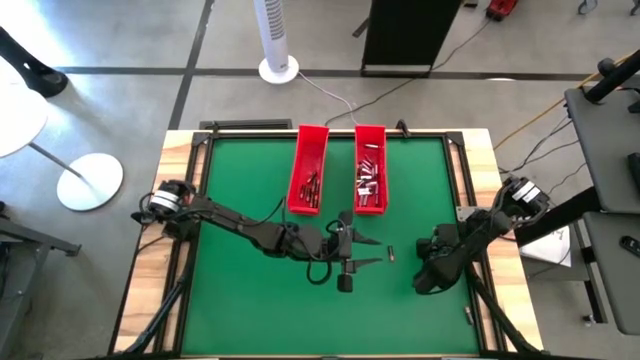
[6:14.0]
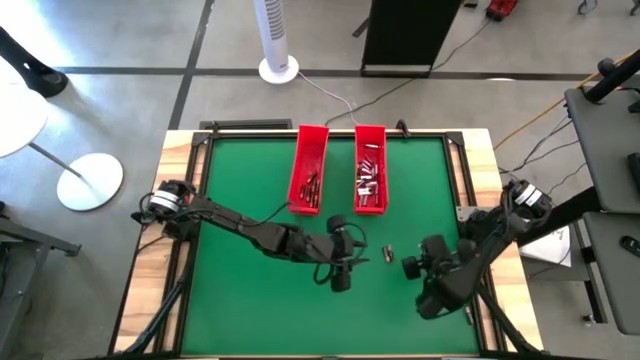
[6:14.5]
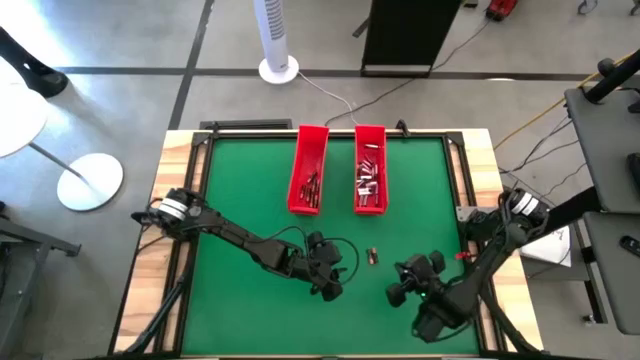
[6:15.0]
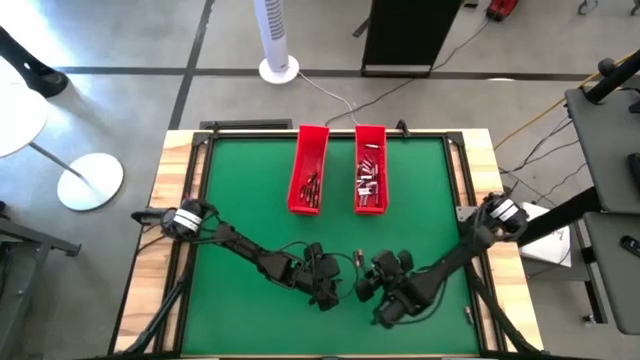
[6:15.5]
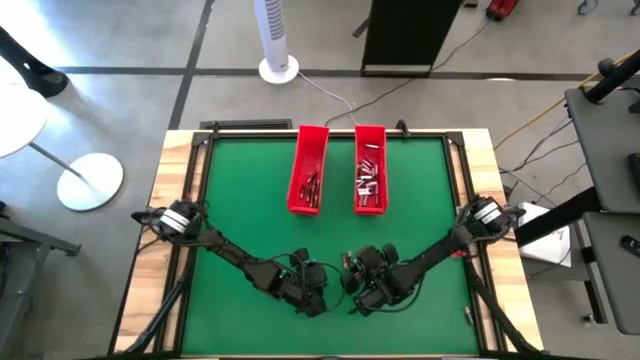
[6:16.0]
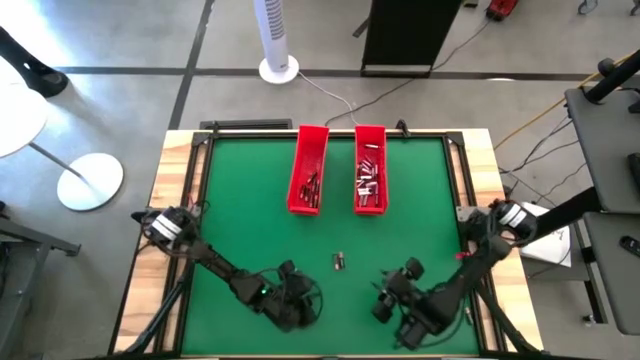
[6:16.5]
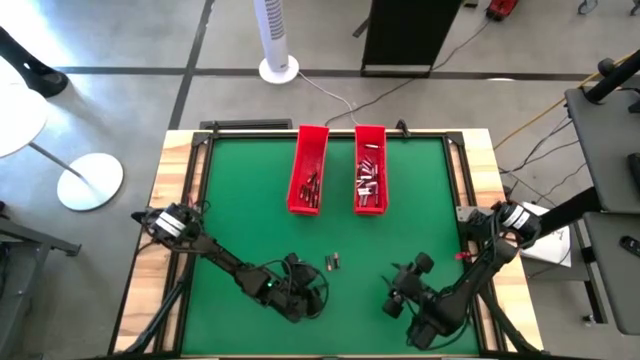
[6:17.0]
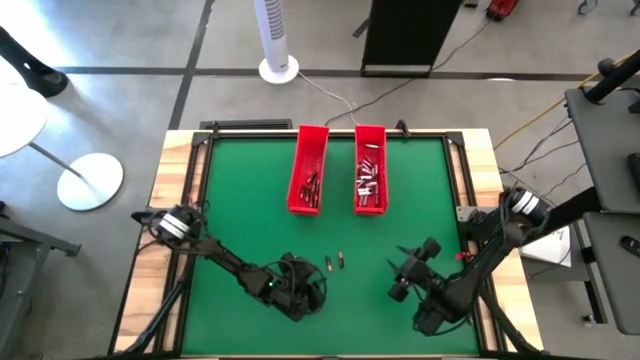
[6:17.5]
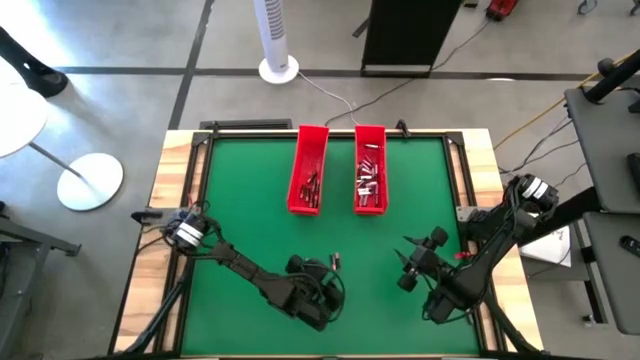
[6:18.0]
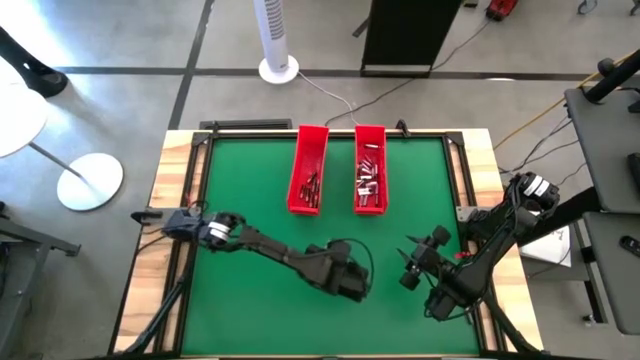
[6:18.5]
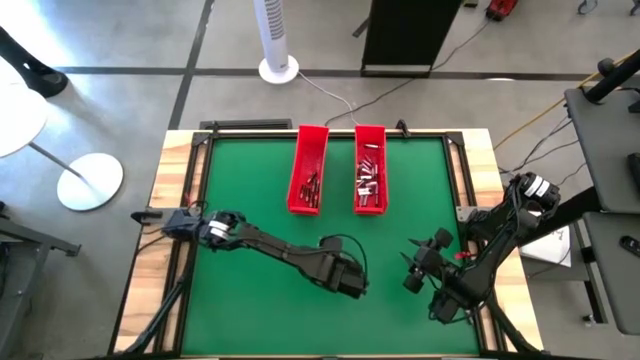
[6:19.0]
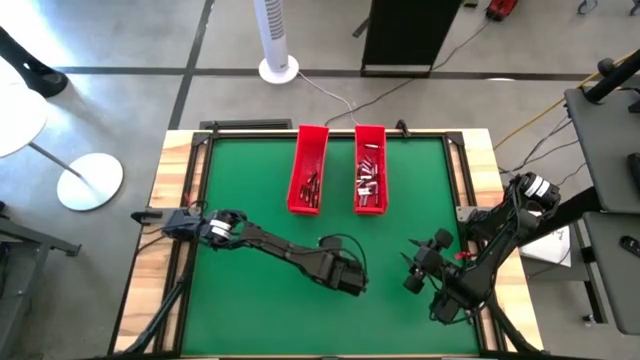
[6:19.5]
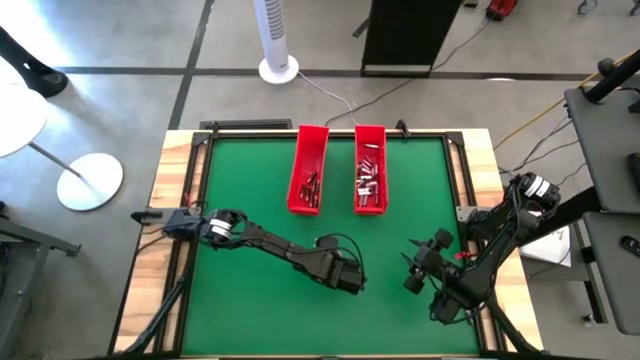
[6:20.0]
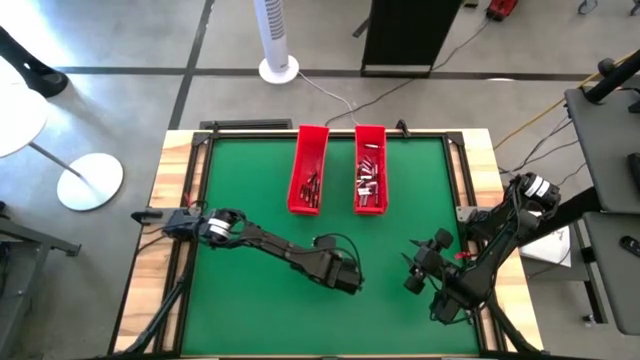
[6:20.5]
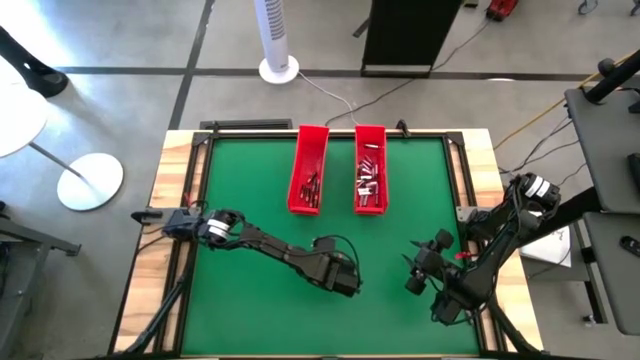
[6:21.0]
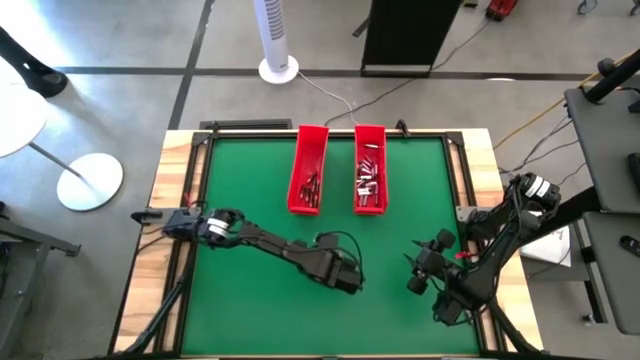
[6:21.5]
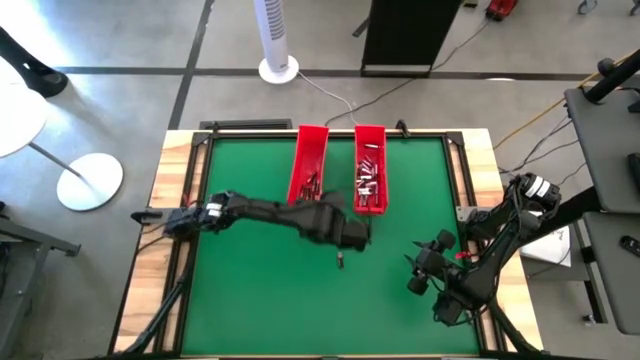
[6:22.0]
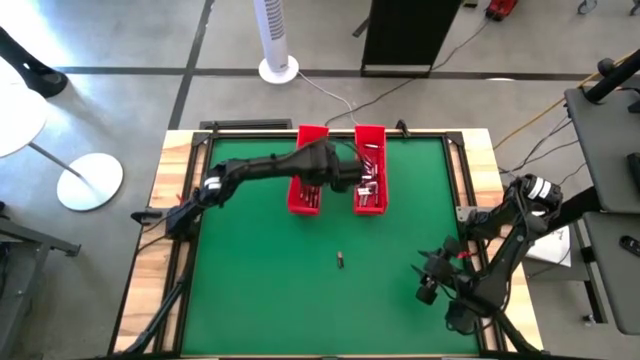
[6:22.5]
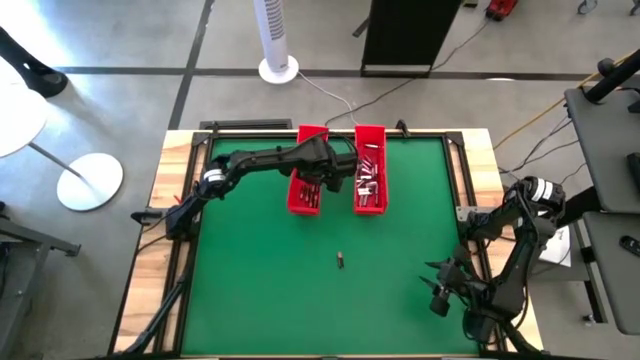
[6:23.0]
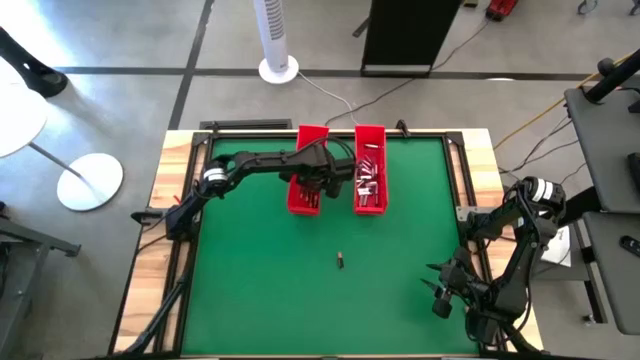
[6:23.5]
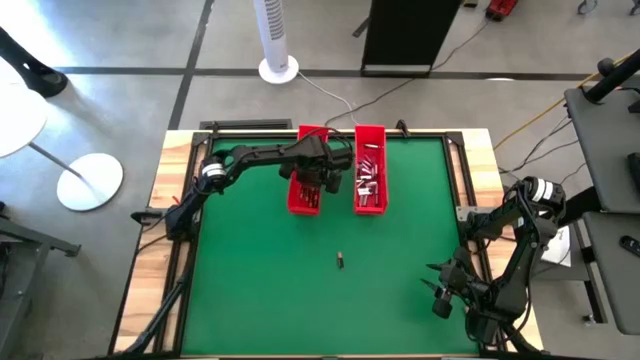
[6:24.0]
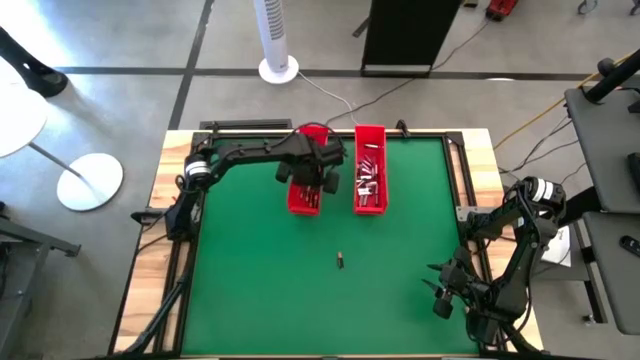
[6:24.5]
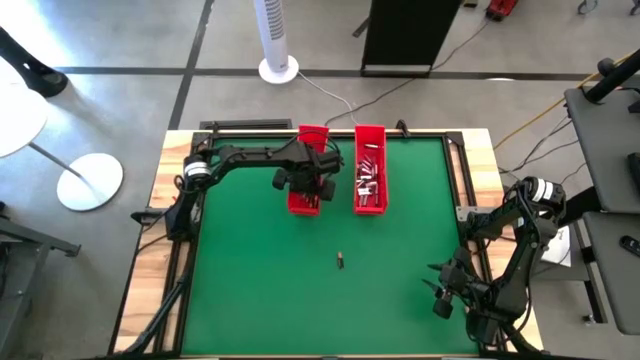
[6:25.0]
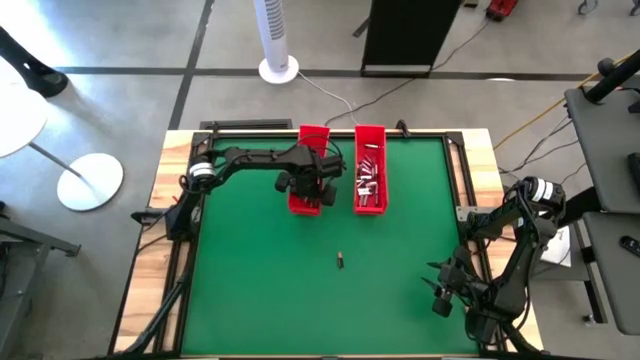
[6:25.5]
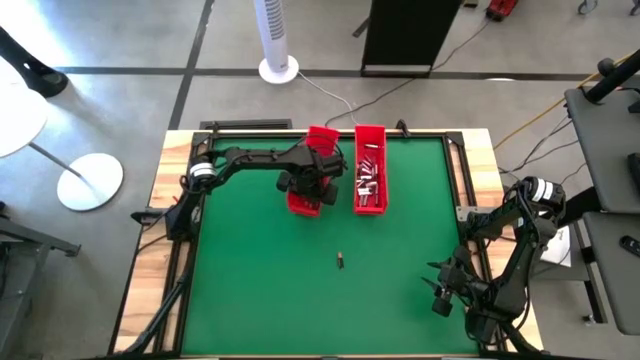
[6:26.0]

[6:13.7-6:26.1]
Task: Sort batteries
Put the black battery into the left red bin

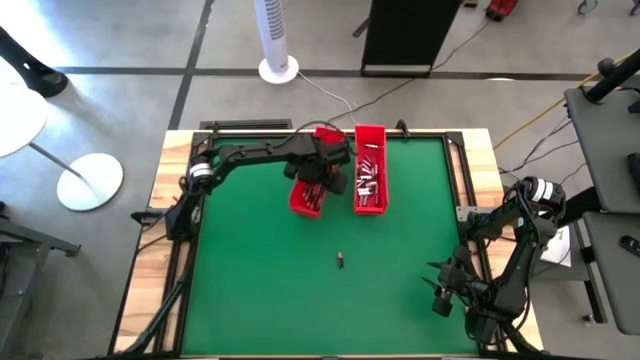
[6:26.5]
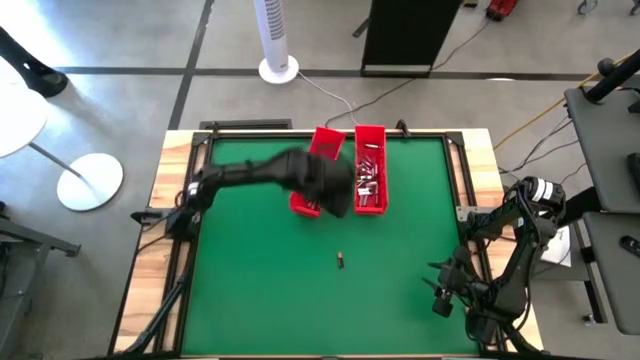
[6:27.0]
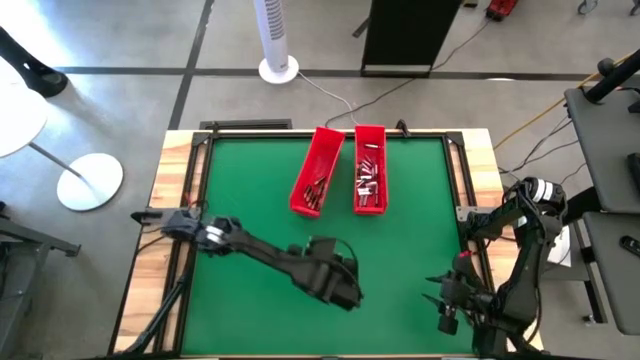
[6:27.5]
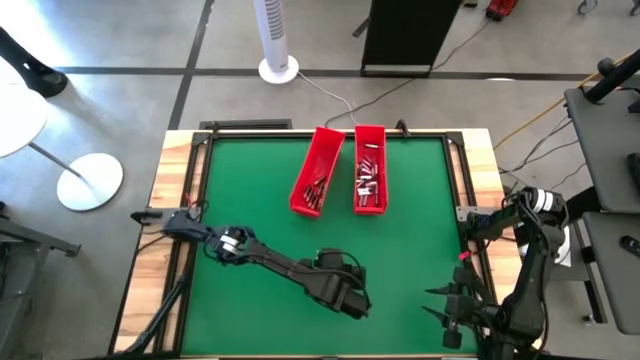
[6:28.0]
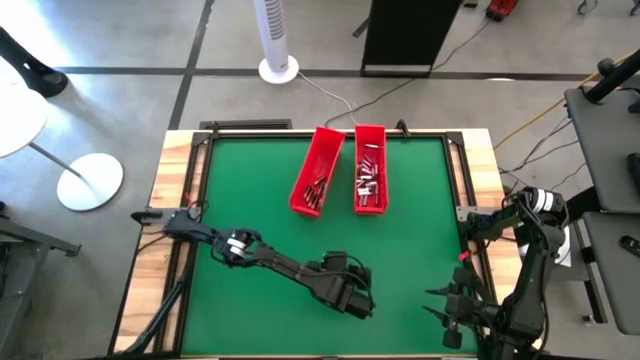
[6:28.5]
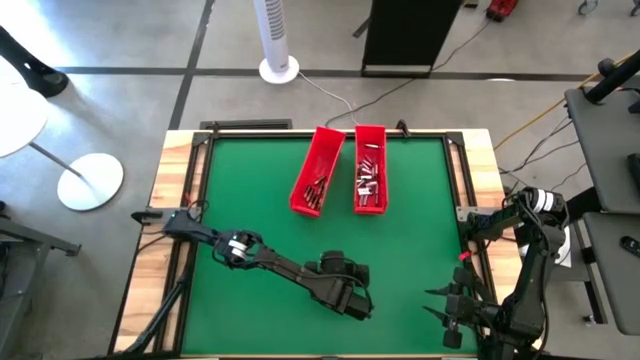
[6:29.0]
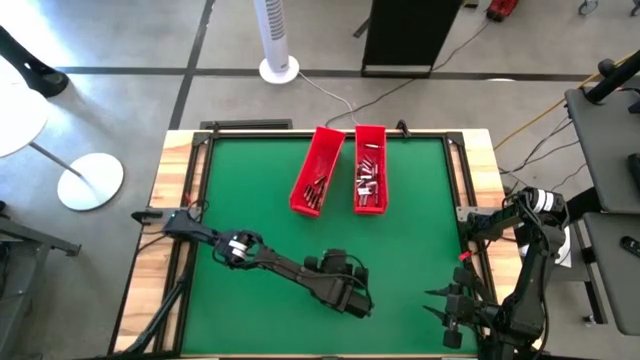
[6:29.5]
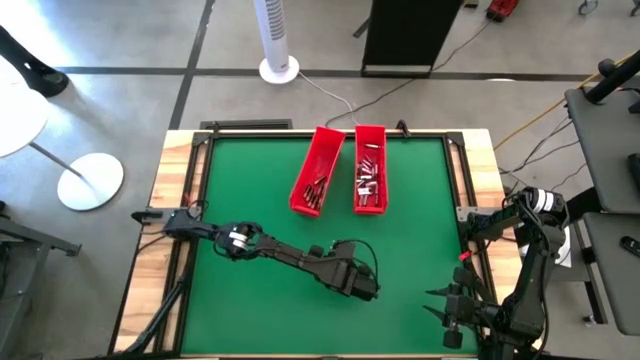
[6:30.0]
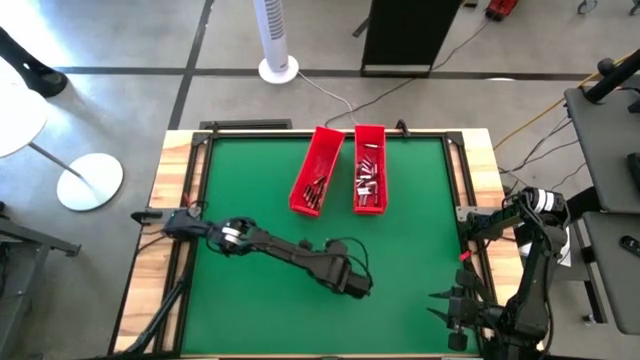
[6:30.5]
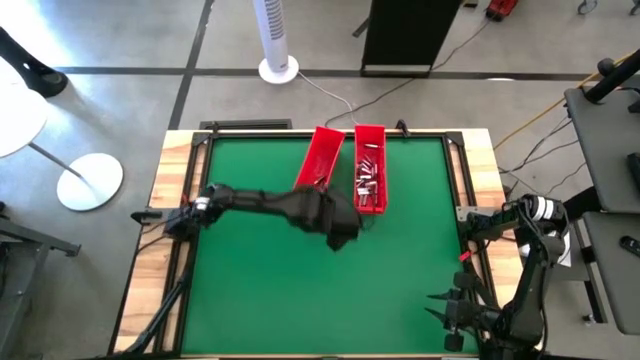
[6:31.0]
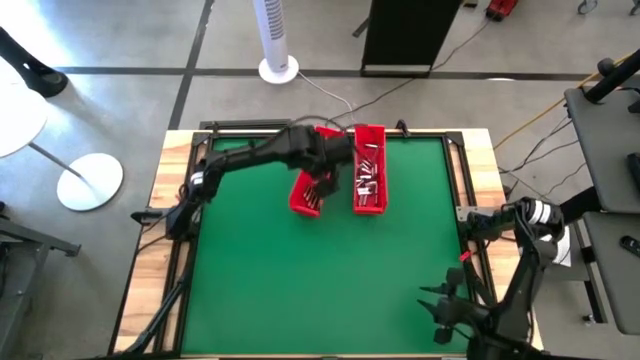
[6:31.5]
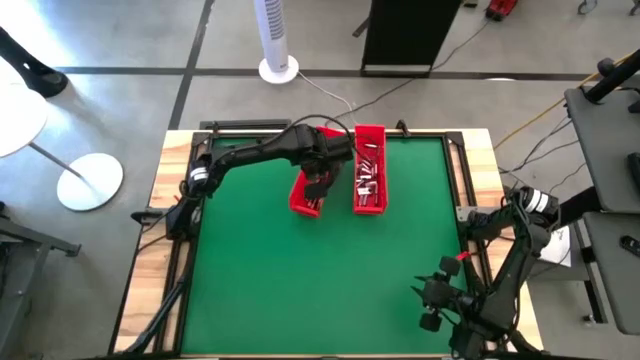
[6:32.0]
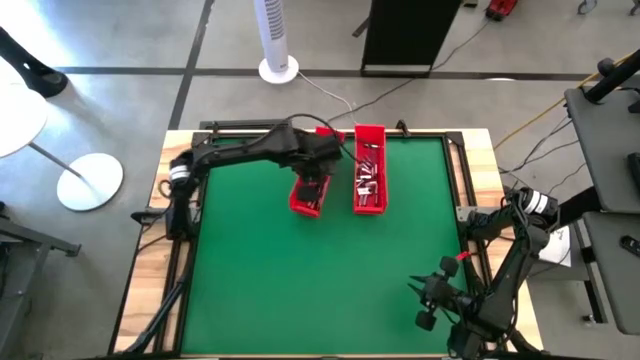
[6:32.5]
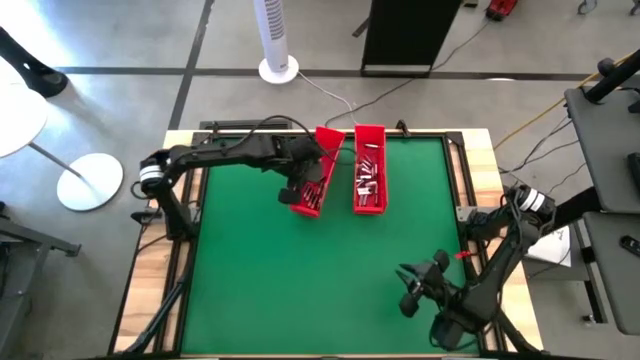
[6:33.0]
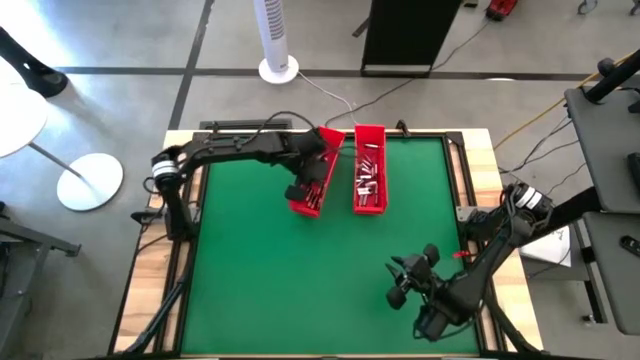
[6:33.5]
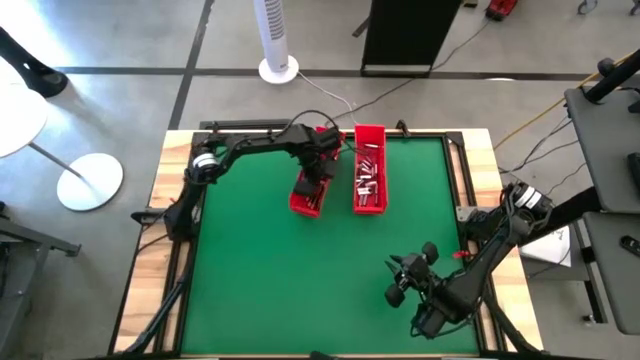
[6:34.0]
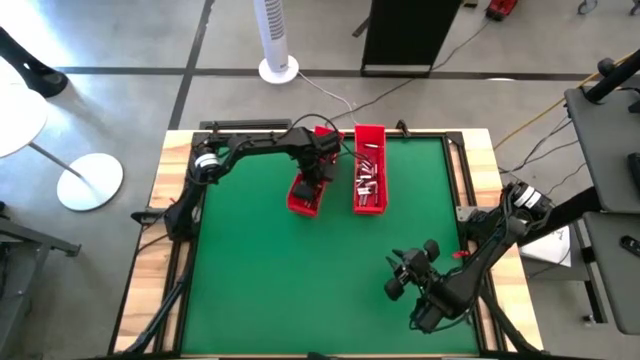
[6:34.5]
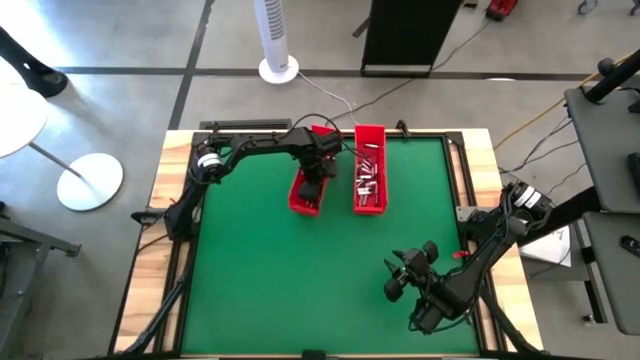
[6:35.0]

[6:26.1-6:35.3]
Put the black battery into the left red bin
